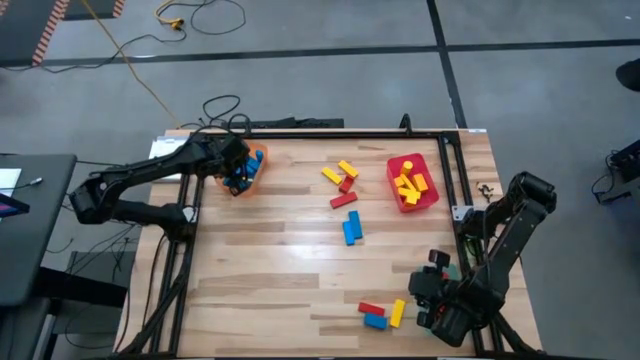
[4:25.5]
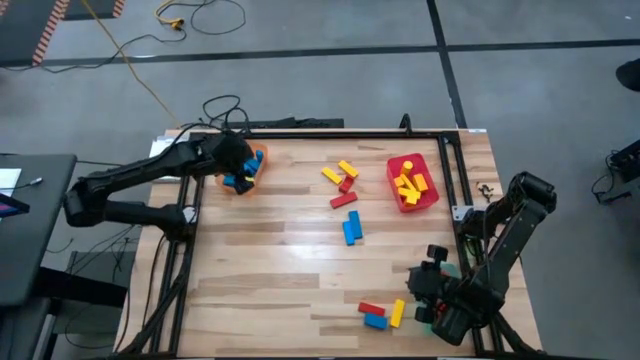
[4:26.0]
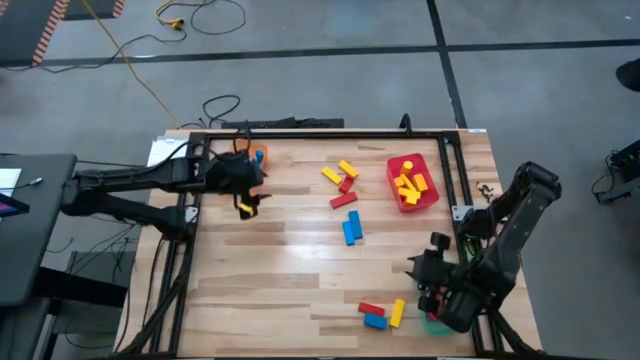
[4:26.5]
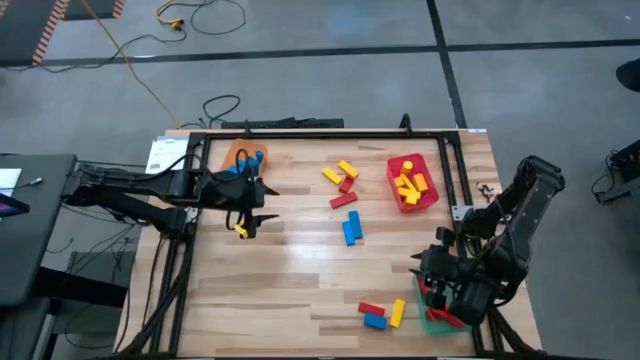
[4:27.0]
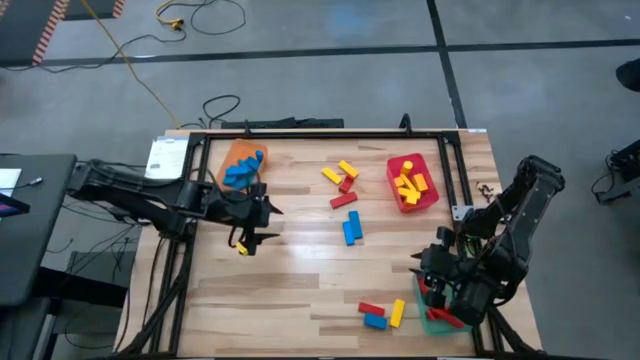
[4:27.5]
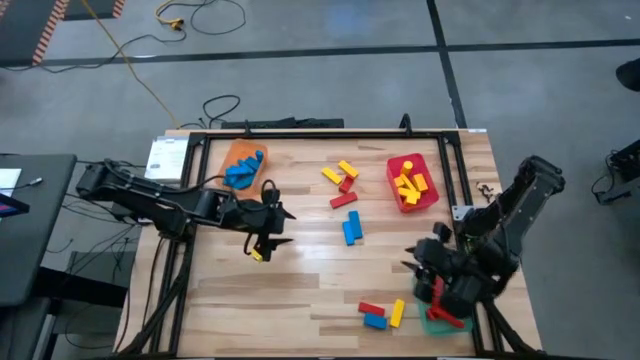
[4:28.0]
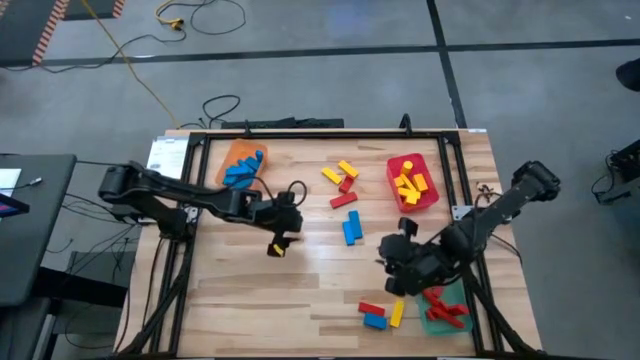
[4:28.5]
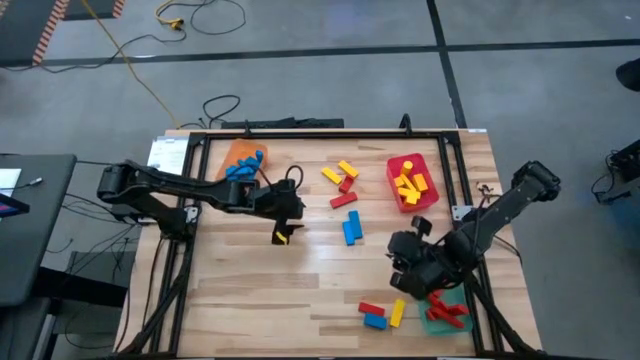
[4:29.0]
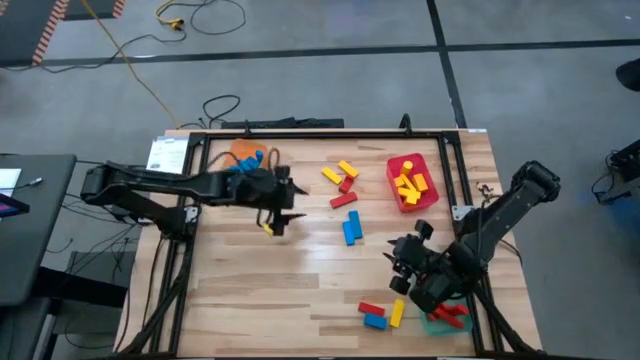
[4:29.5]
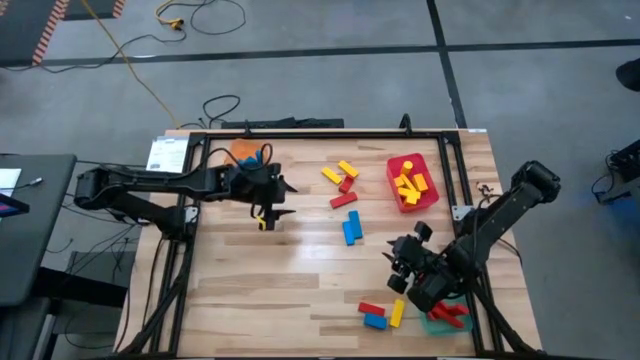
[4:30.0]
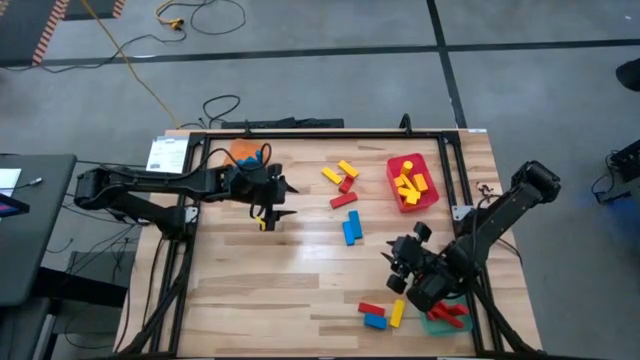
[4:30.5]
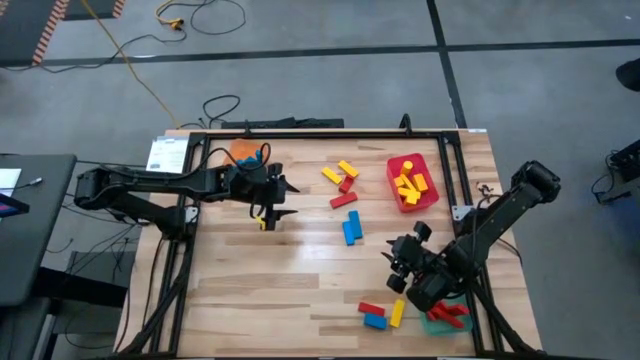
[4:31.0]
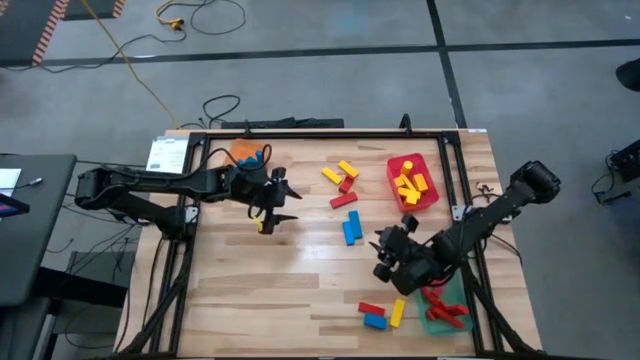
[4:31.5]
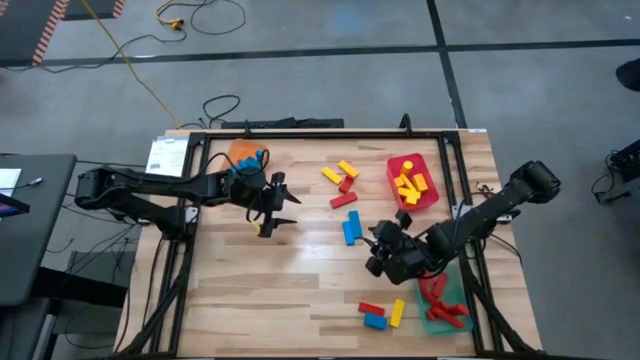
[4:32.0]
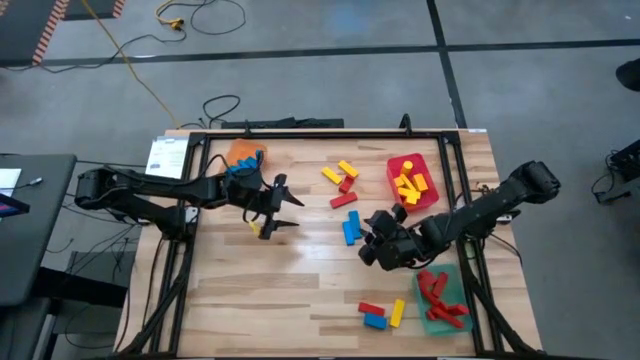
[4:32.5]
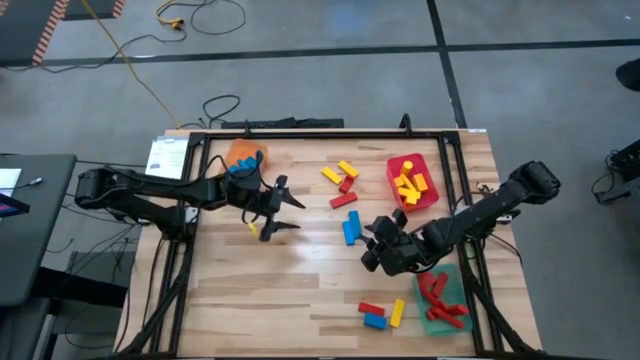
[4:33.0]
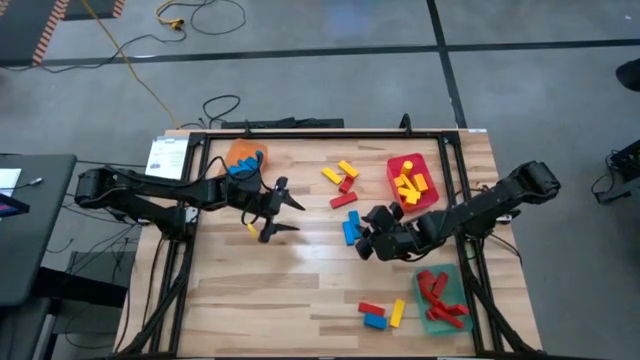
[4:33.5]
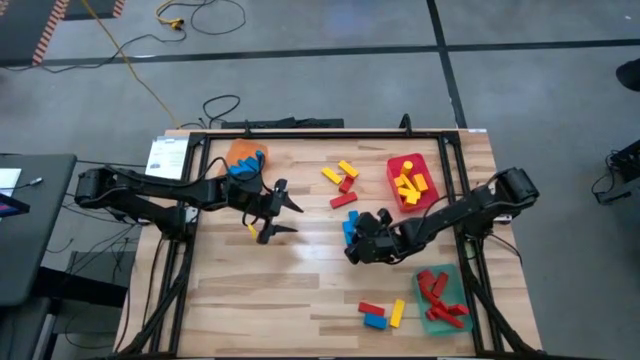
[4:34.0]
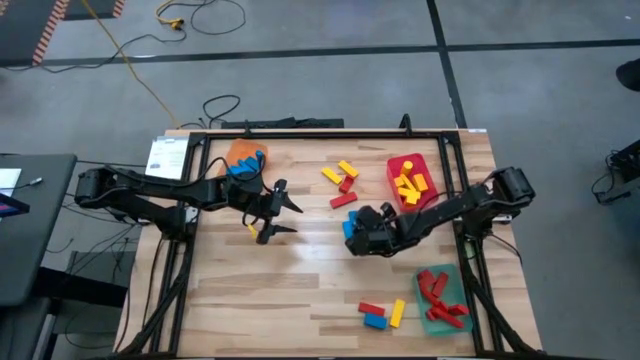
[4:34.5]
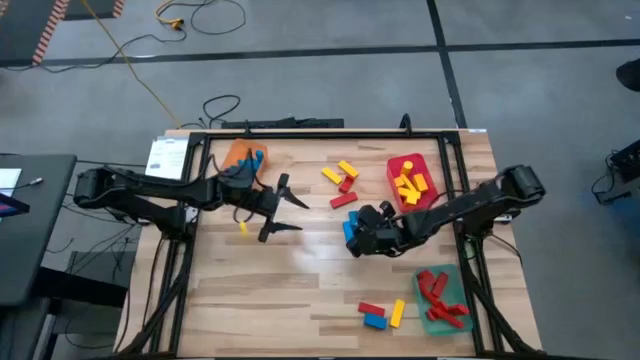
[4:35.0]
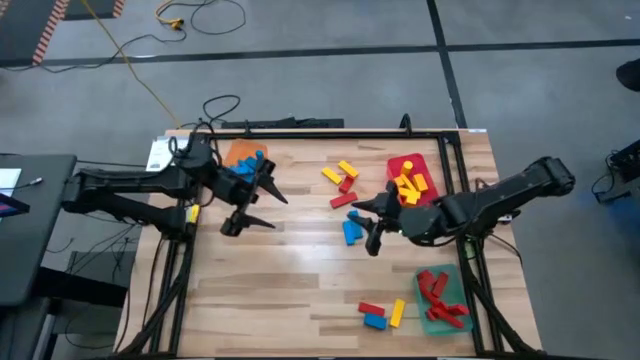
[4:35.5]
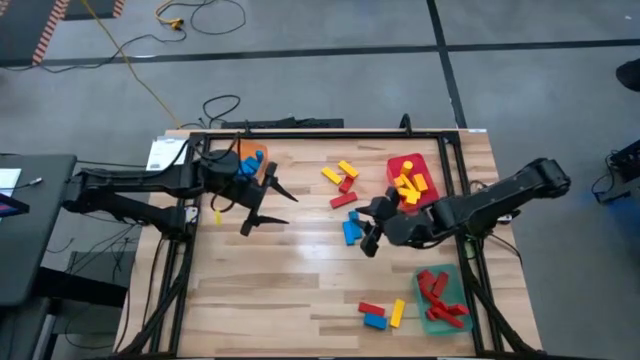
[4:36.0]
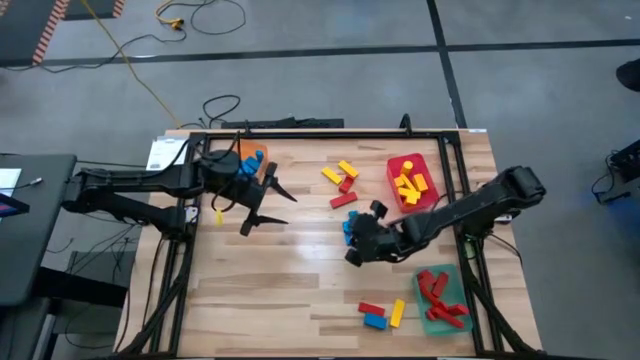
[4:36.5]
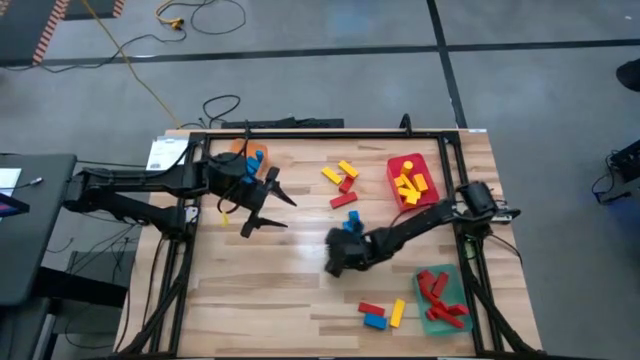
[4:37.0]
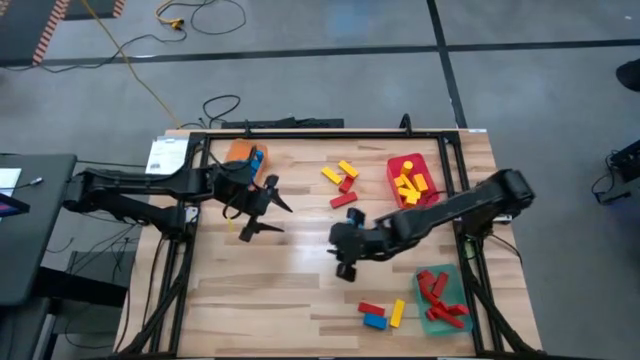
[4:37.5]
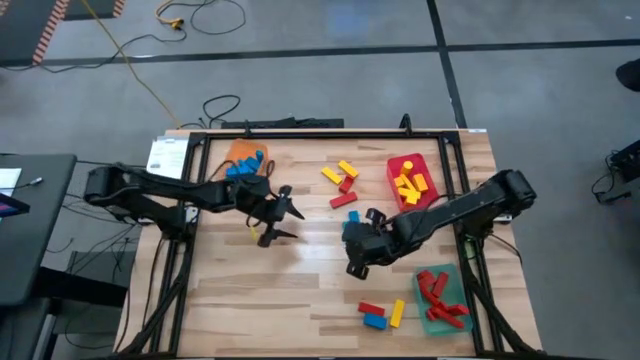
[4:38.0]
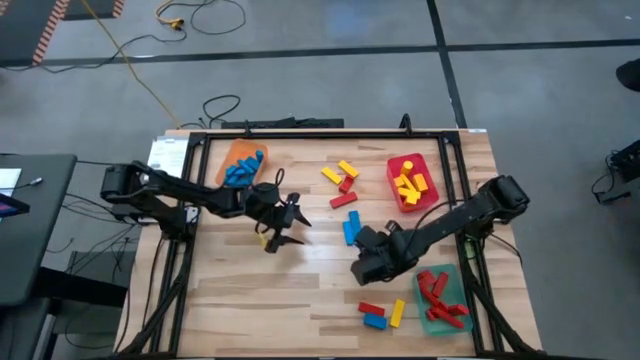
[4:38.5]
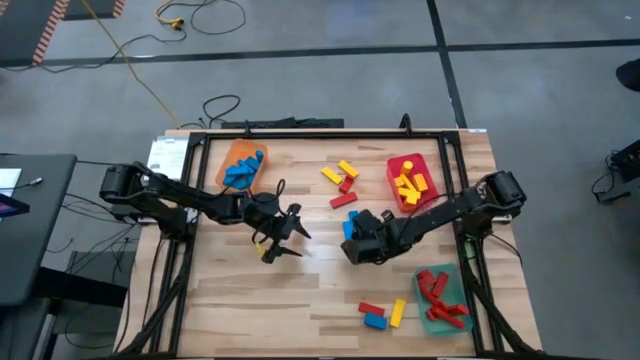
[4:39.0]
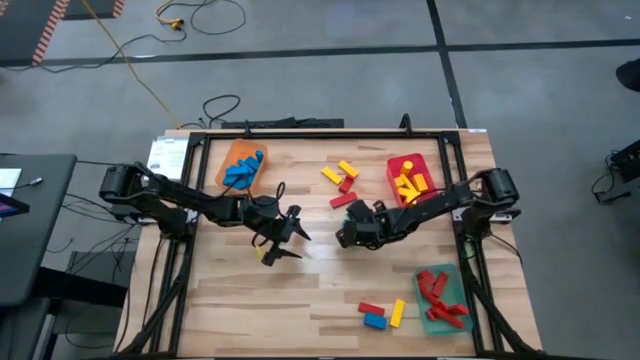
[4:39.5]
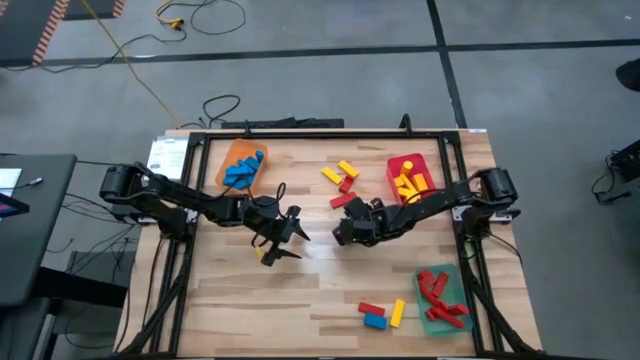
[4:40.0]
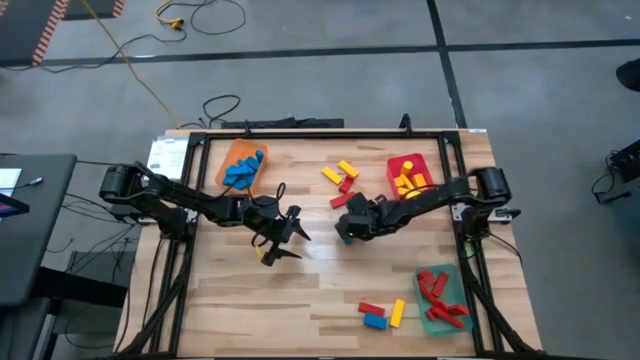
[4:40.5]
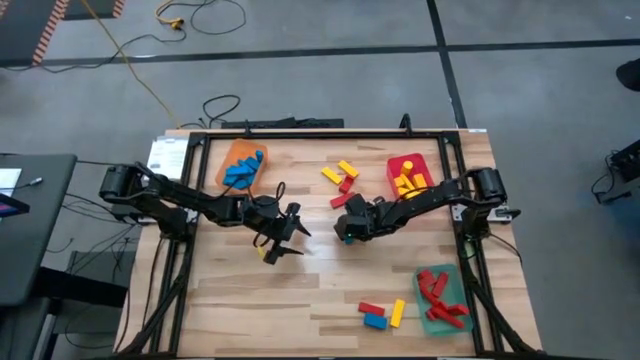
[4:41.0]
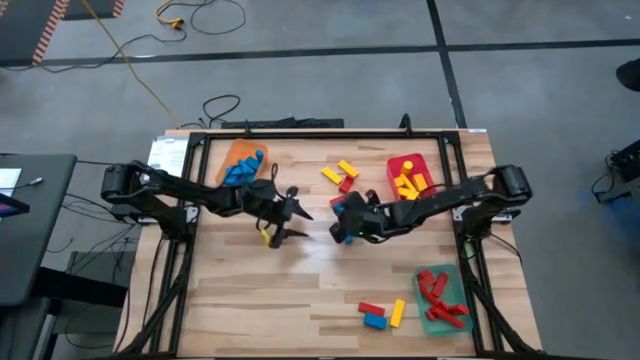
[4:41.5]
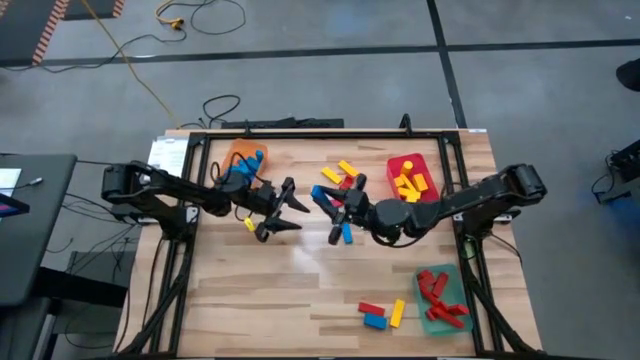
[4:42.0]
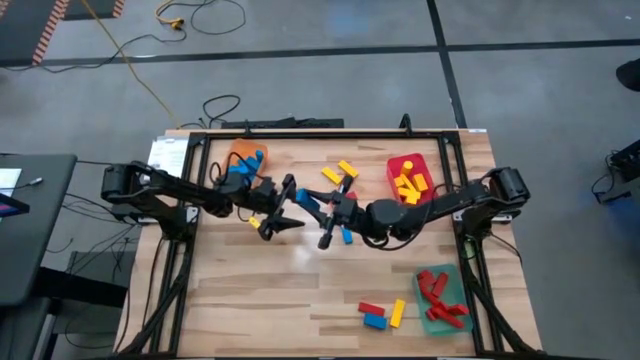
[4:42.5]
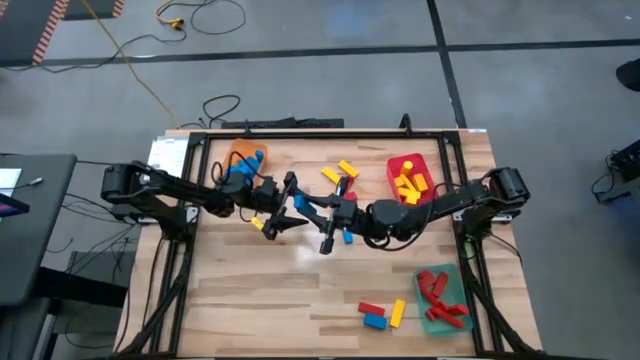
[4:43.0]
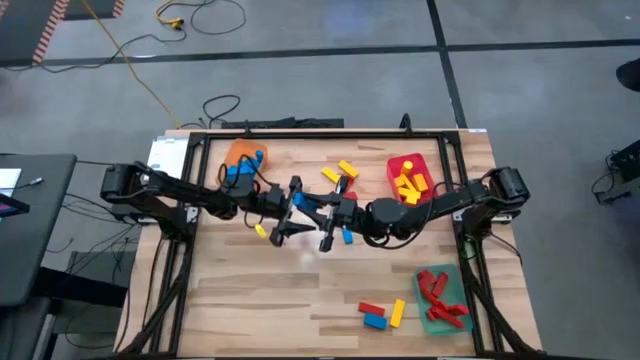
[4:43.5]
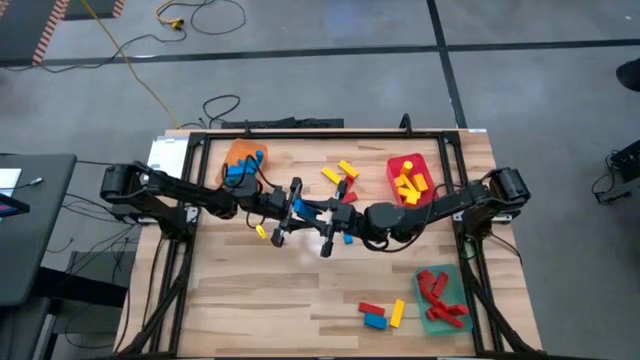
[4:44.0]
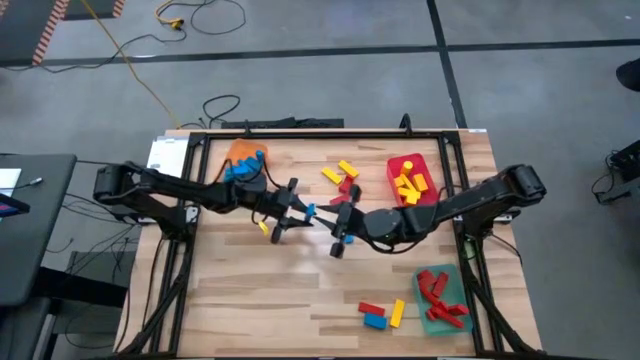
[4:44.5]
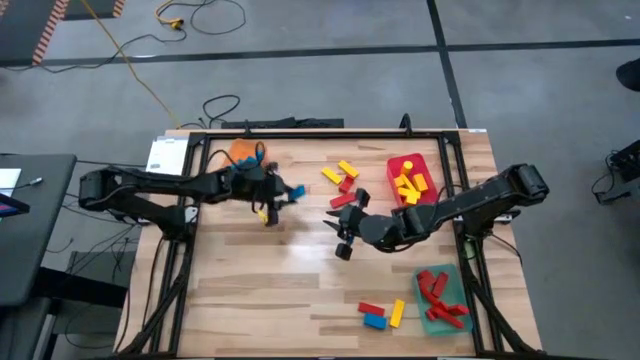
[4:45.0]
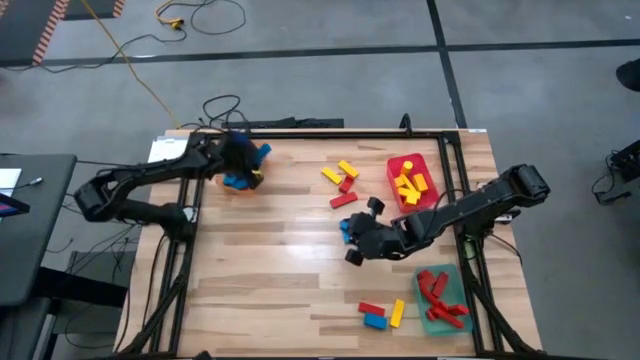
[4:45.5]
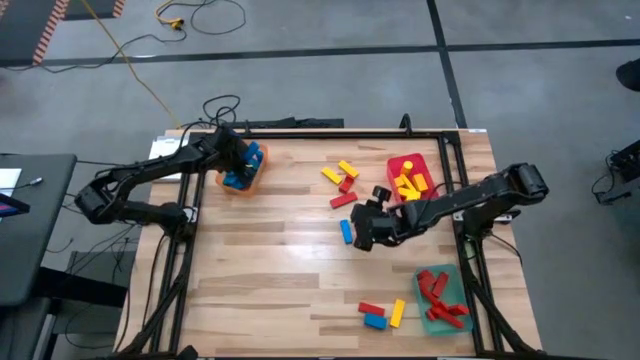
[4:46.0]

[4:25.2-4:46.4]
Task: Sort blocks
Put the blue rectangle block into the orange bin
